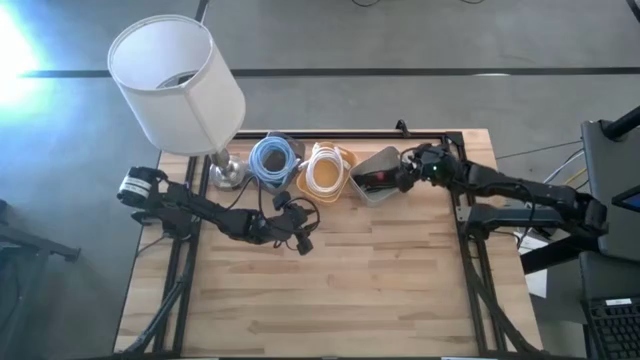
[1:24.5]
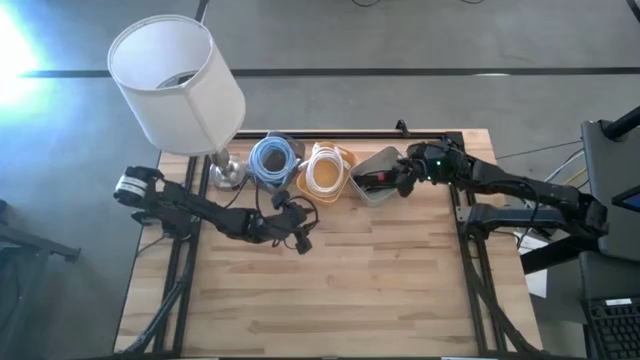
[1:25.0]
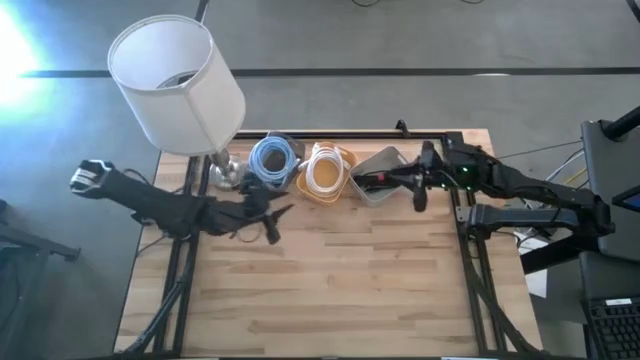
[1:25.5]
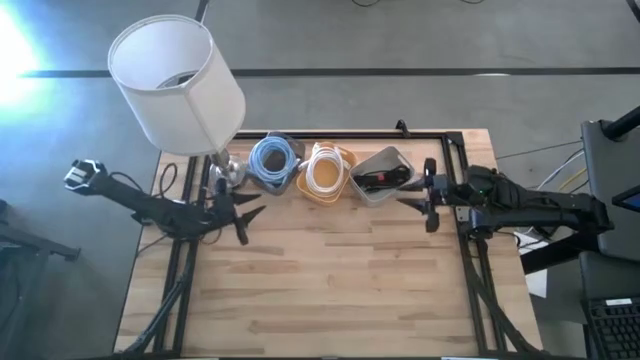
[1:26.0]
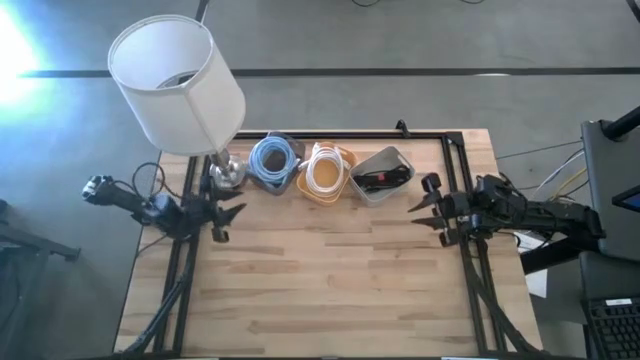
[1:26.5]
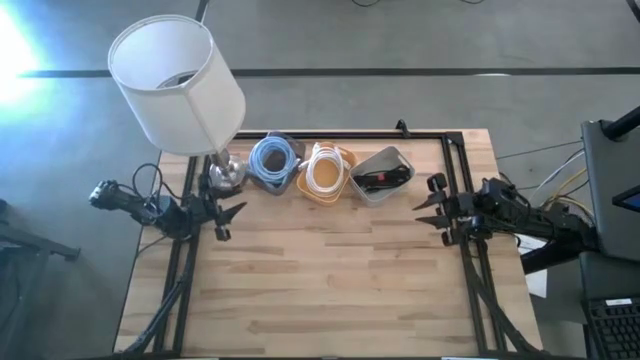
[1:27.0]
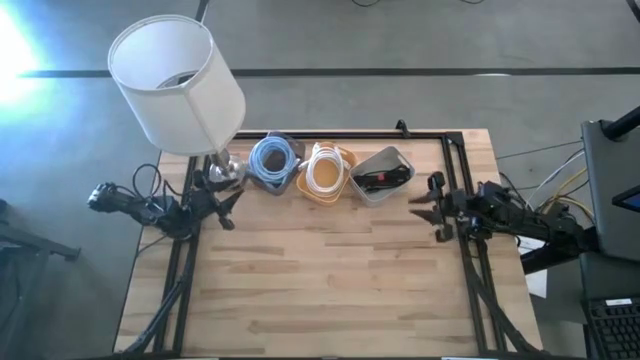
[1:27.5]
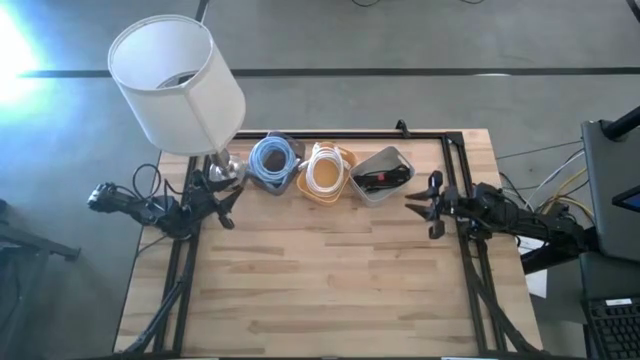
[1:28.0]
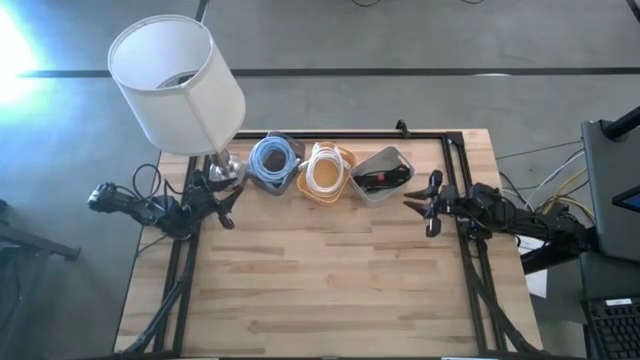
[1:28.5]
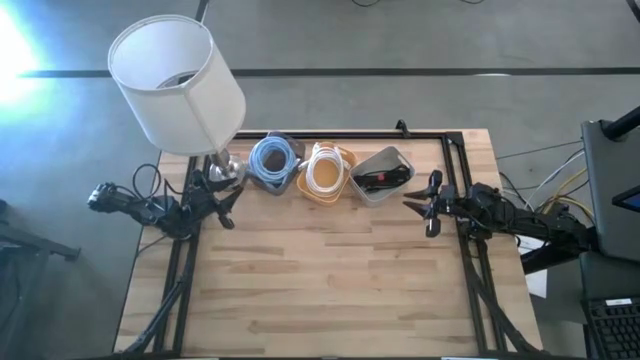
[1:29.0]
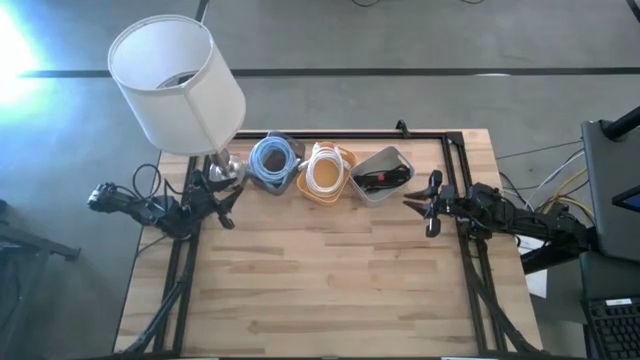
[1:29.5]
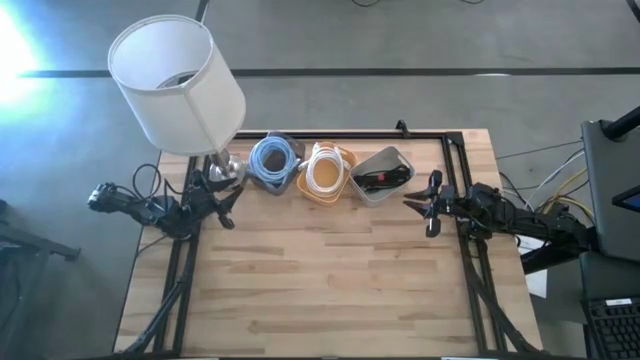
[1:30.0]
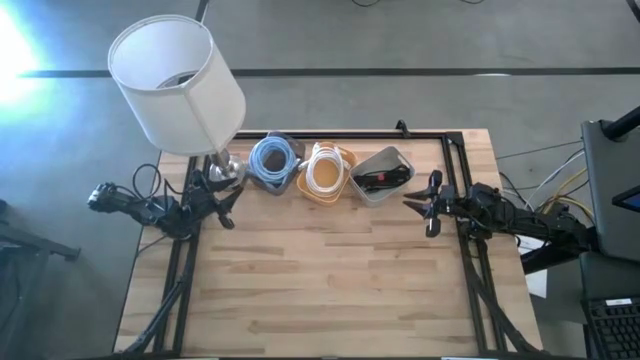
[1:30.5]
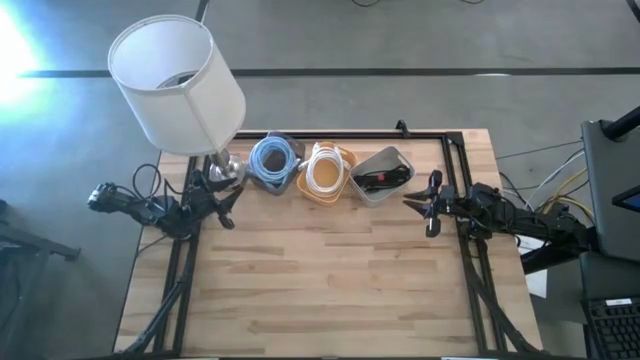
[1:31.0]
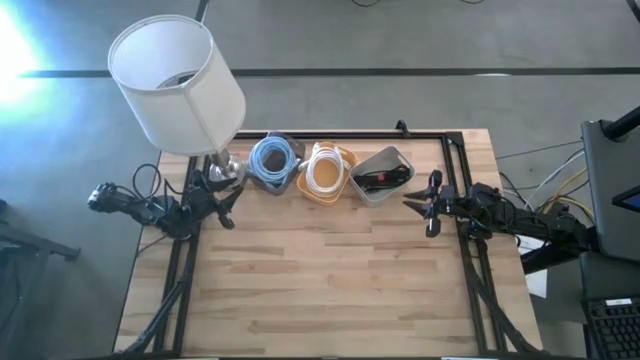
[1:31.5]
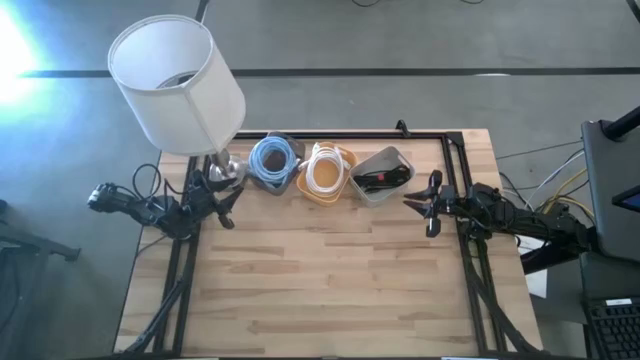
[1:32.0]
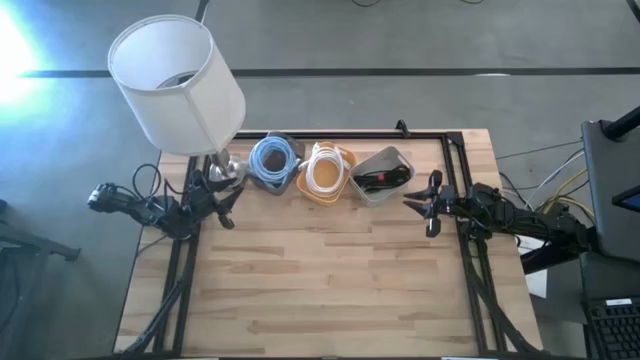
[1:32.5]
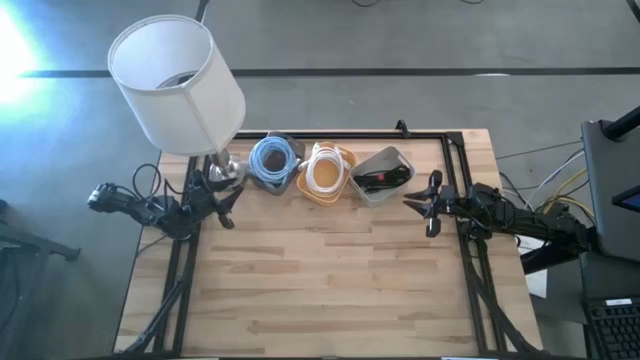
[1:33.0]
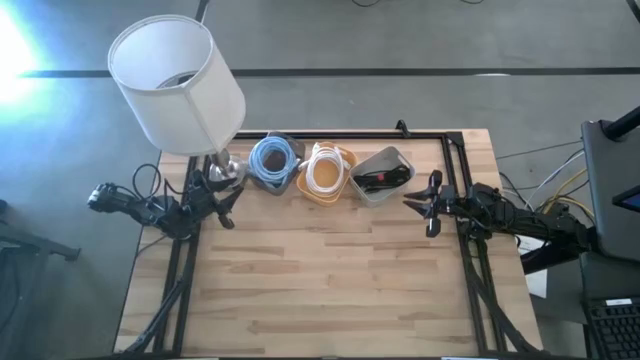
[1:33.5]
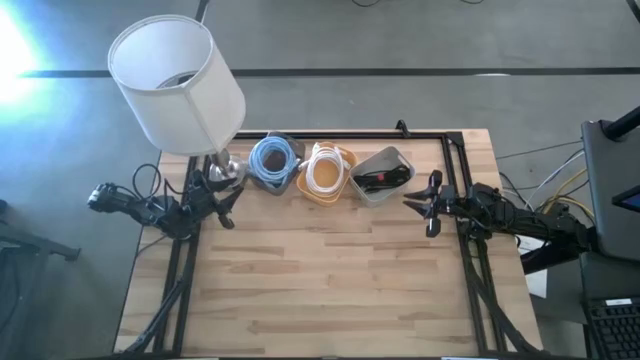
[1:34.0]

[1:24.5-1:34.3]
Task: Pick & Place USB Port
Return to Home Position

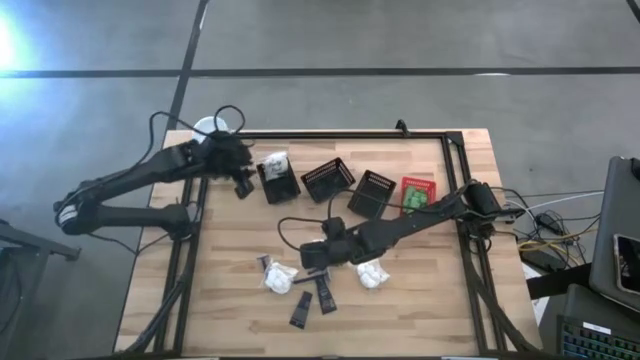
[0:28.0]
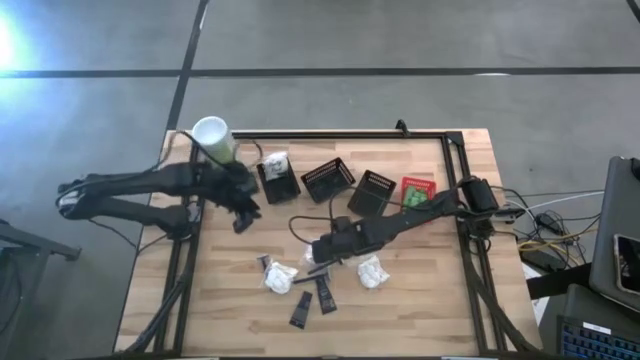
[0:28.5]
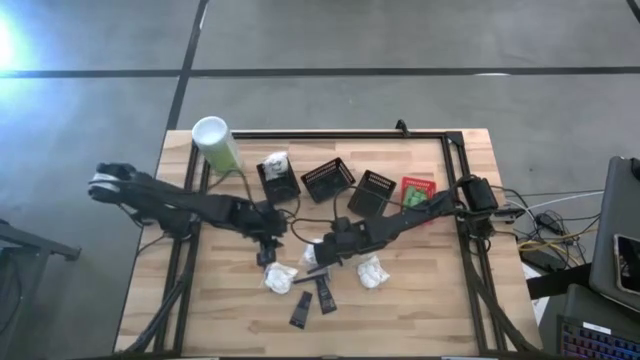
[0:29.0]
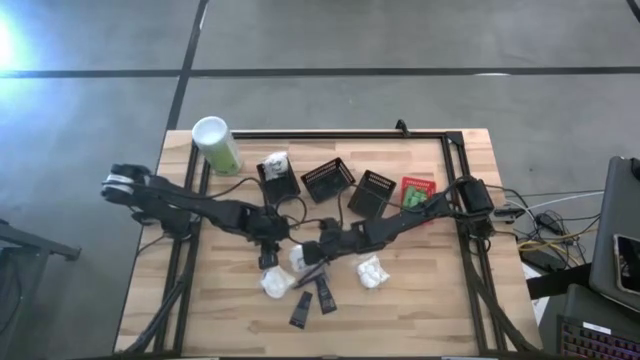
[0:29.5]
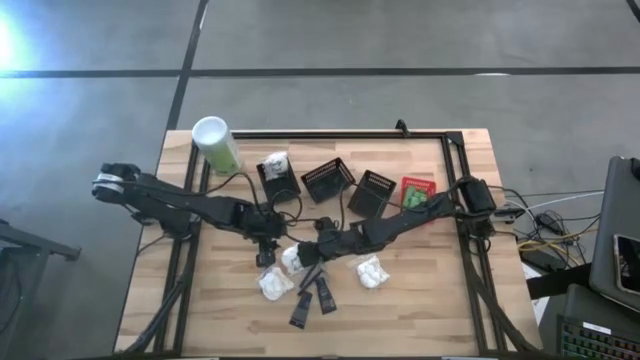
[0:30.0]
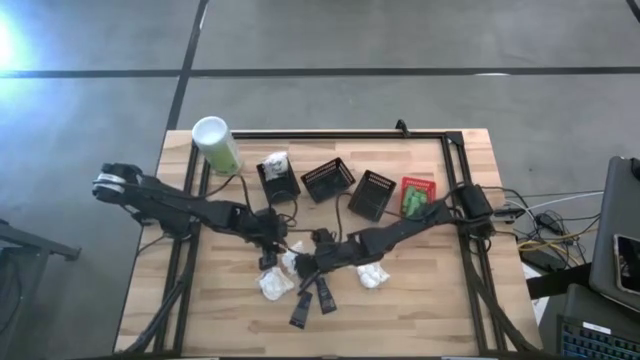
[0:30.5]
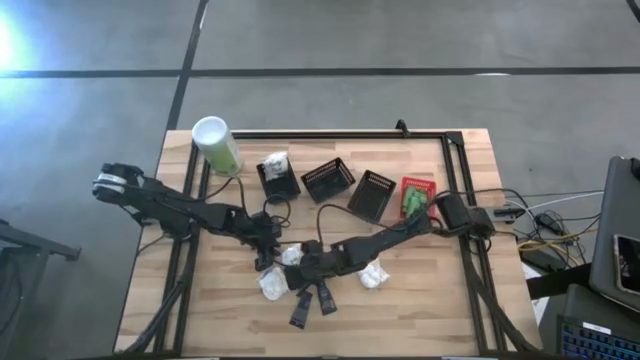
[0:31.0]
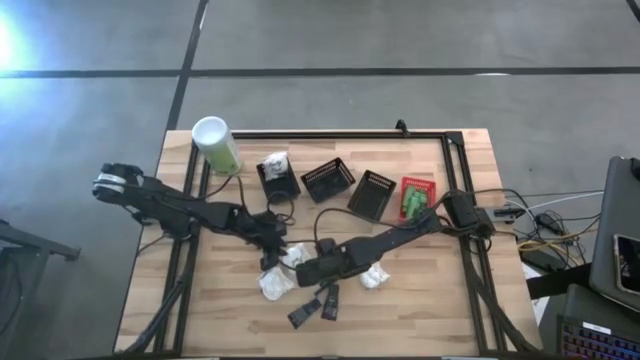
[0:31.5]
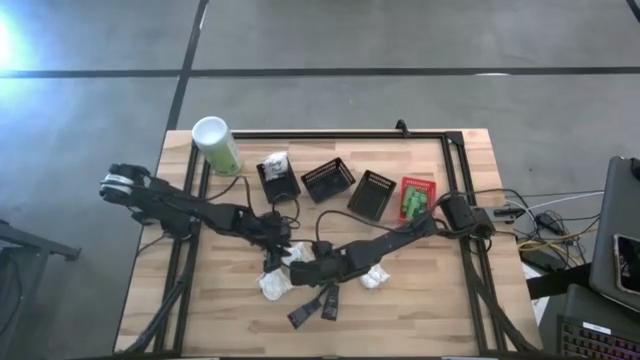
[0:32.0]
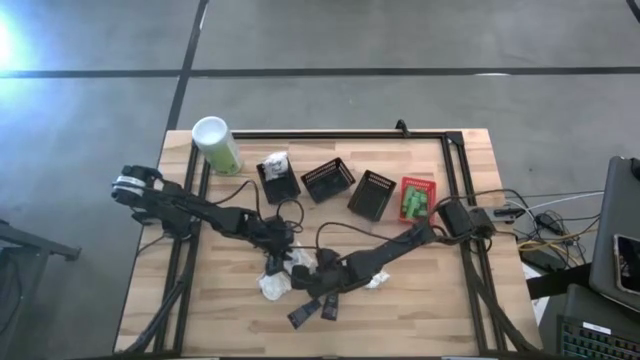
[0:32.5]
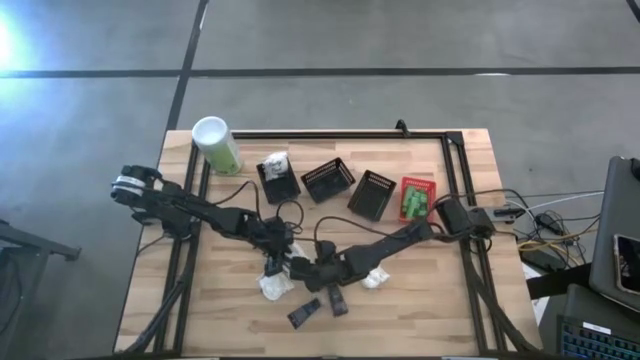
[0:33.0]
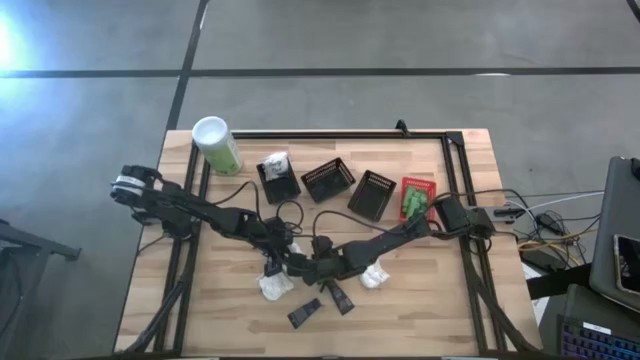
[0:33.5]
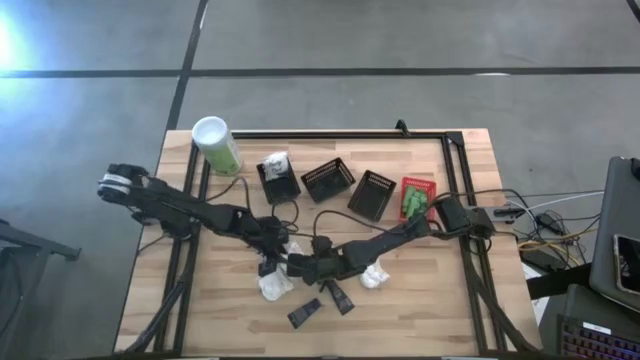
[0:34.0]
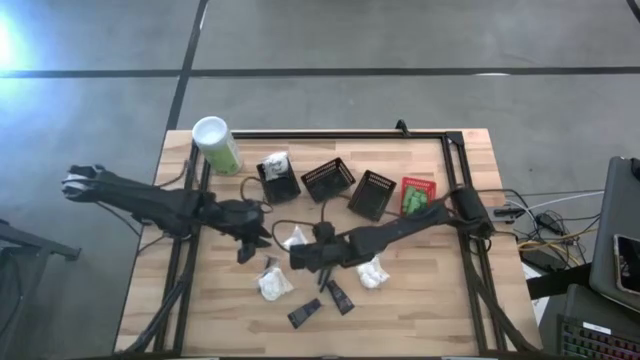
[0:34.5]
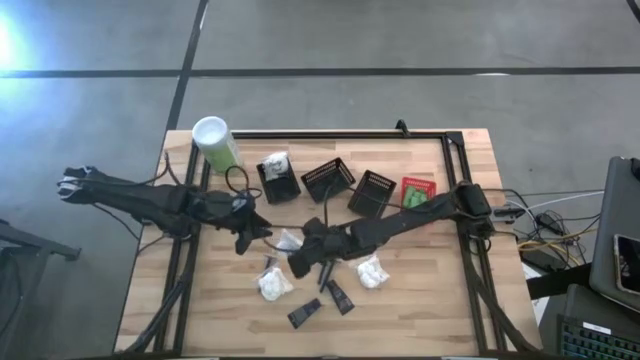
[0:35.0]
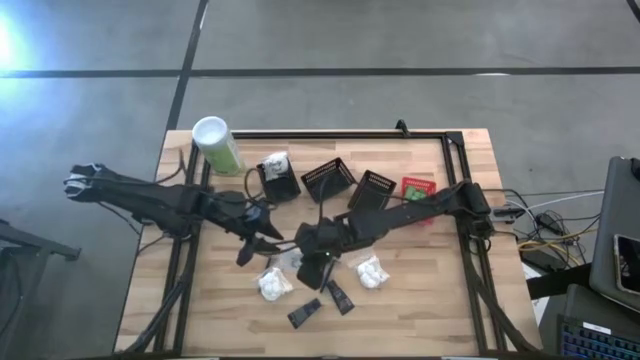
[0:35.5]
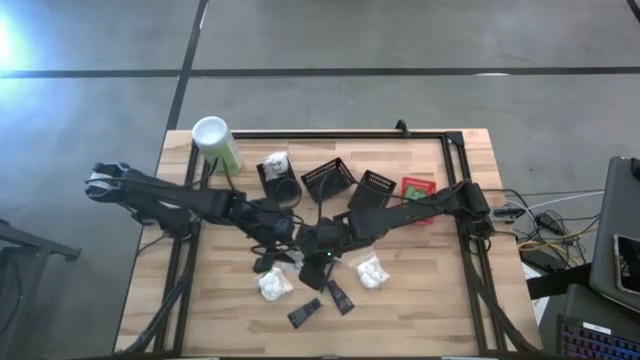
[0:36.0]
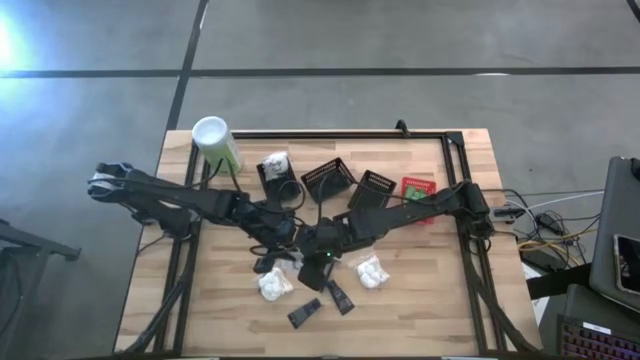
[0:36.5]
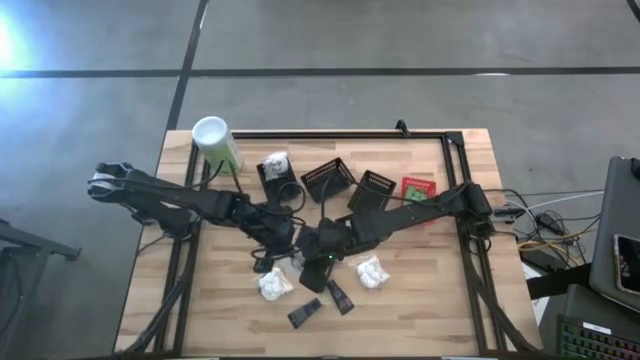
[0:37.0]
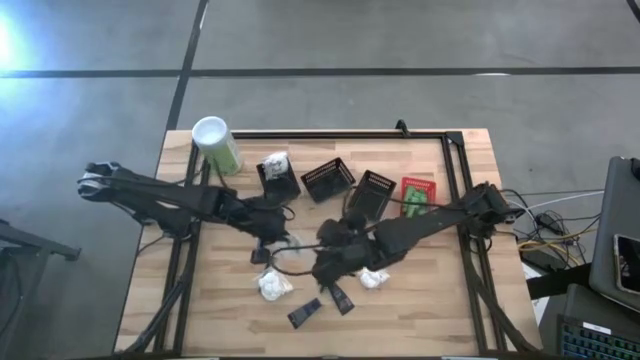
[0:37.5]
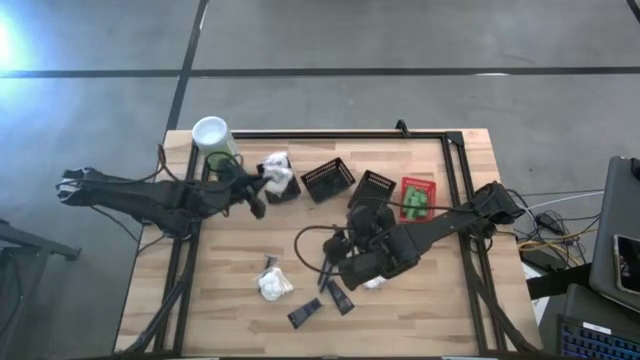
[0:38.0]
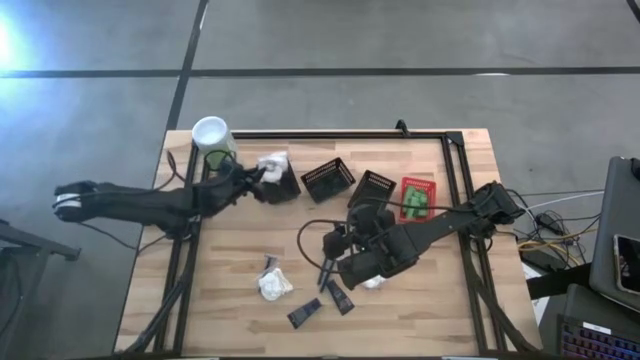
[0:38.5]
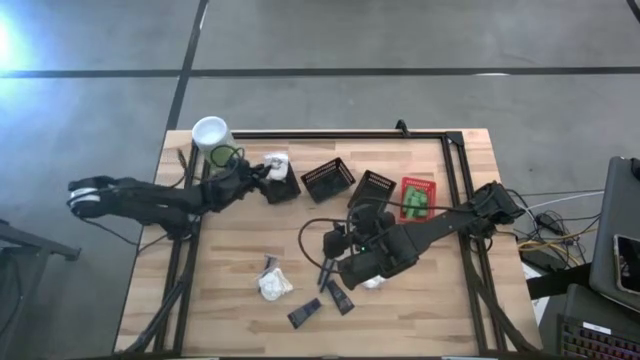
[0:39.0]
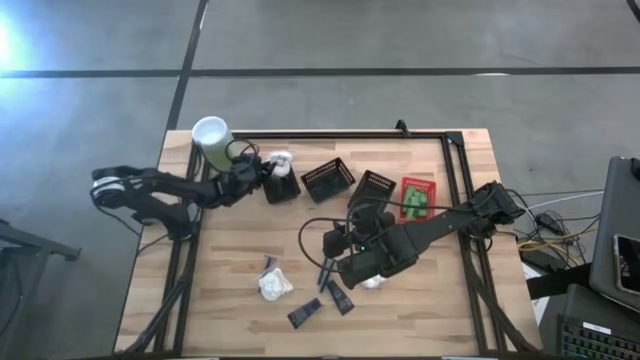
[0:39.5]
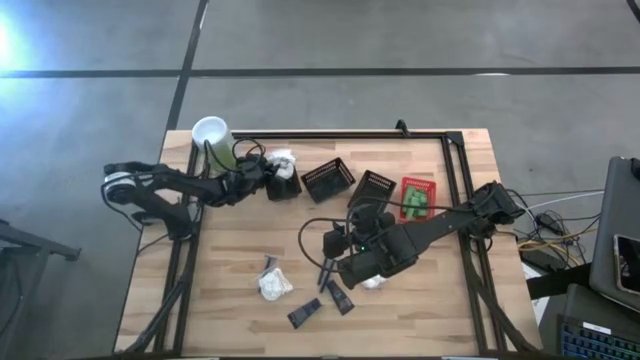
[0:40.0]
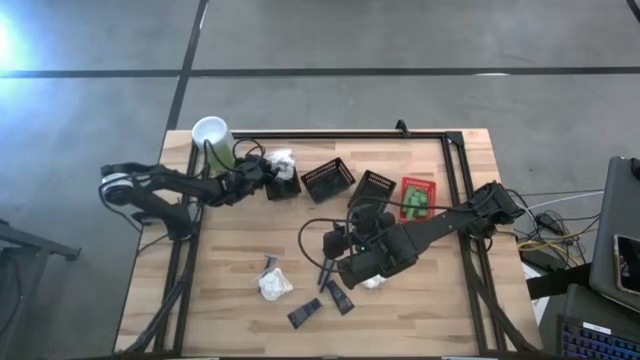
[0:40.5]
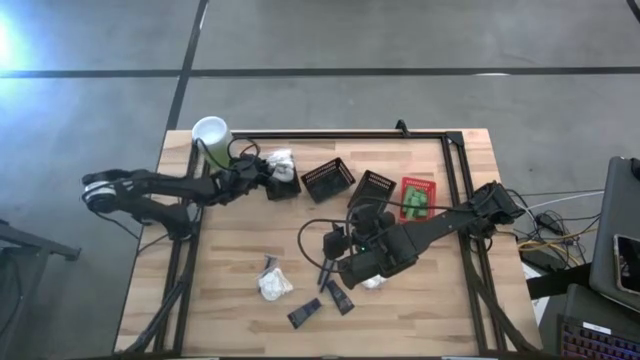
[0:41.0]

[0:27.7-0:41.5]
Task: Pick & Place Travel size toiletries
Put the cotton pack into the left black bin
